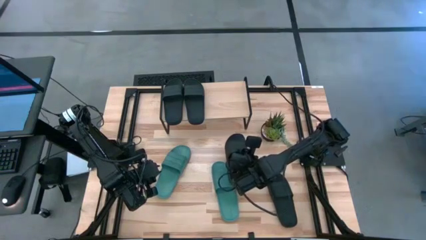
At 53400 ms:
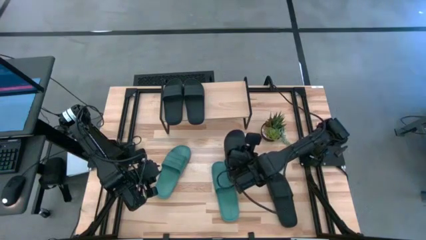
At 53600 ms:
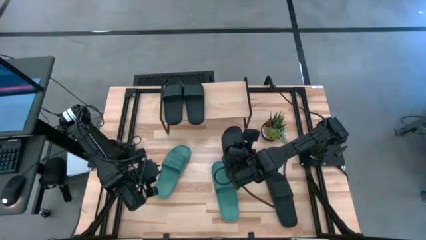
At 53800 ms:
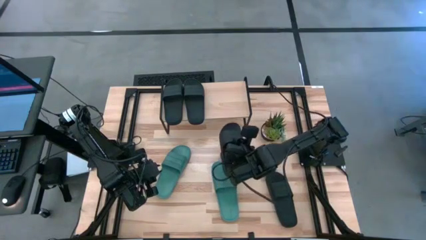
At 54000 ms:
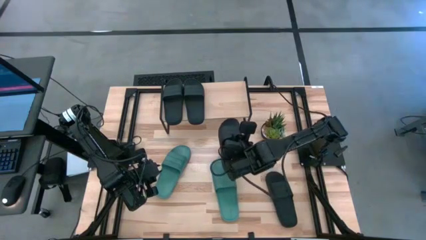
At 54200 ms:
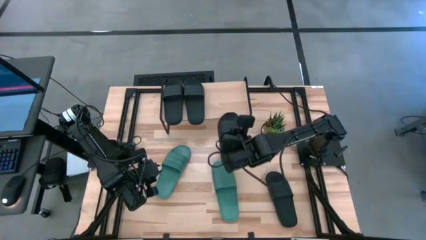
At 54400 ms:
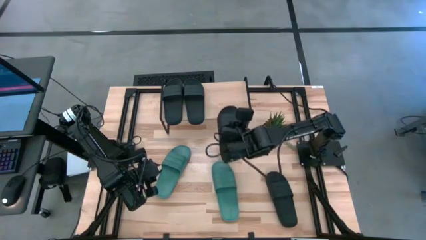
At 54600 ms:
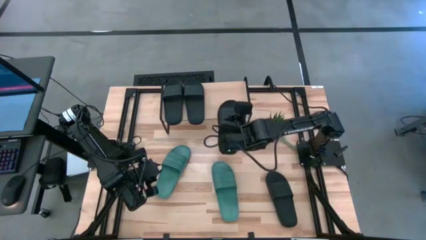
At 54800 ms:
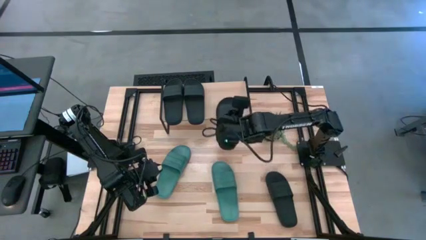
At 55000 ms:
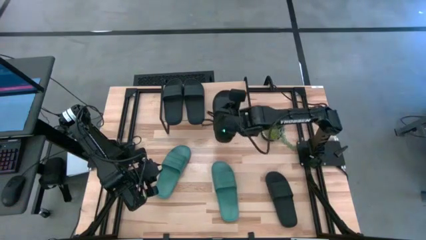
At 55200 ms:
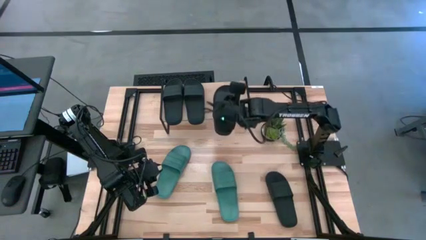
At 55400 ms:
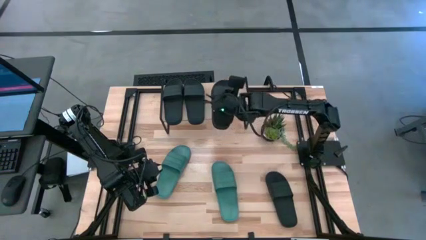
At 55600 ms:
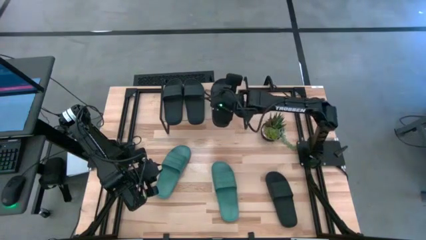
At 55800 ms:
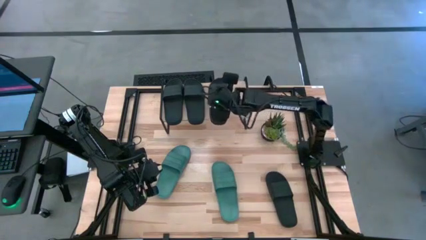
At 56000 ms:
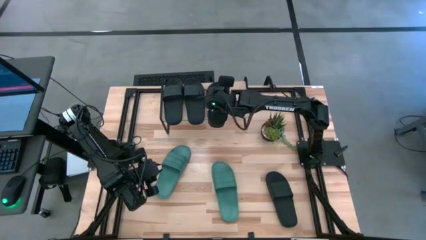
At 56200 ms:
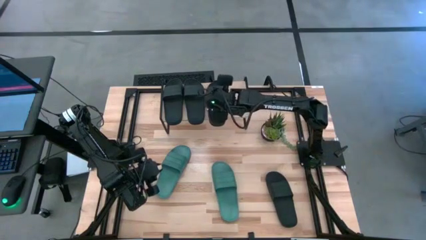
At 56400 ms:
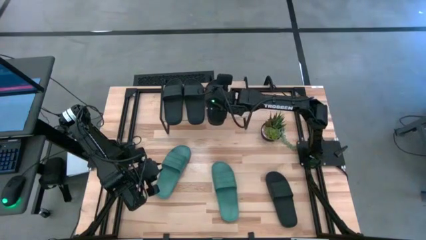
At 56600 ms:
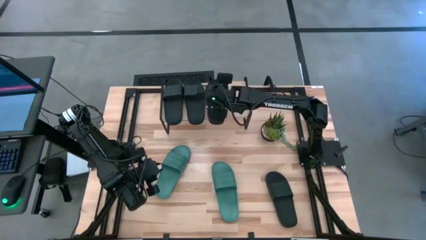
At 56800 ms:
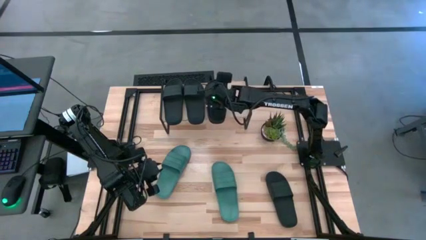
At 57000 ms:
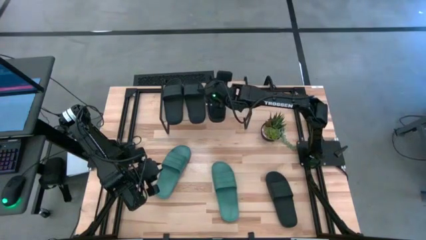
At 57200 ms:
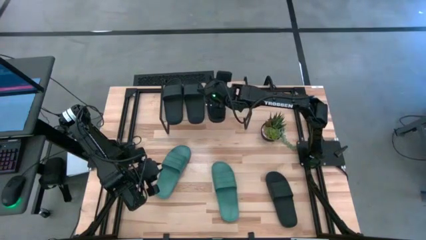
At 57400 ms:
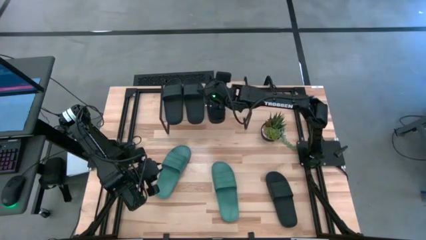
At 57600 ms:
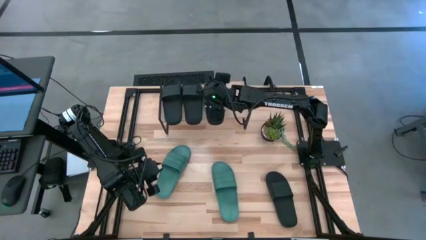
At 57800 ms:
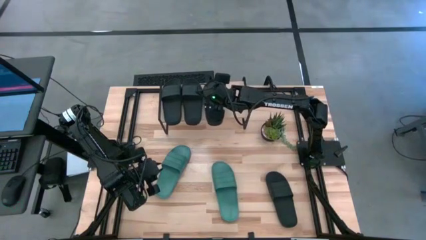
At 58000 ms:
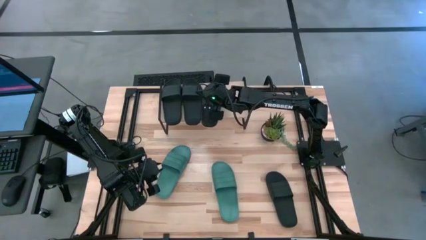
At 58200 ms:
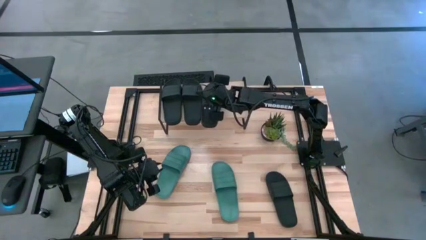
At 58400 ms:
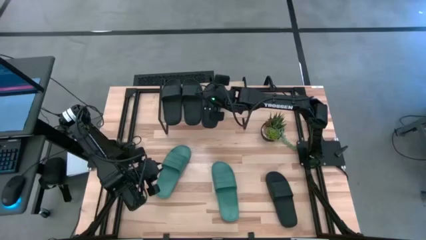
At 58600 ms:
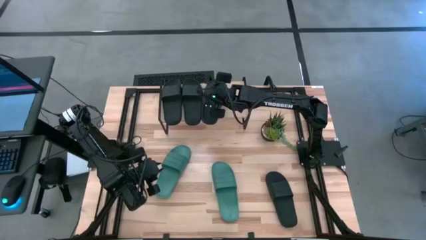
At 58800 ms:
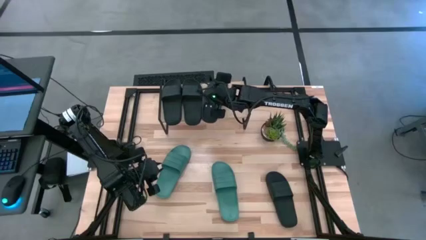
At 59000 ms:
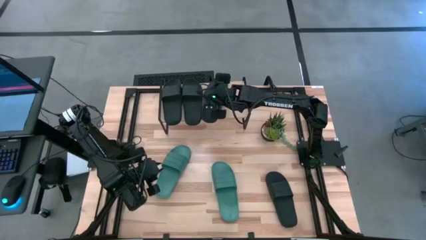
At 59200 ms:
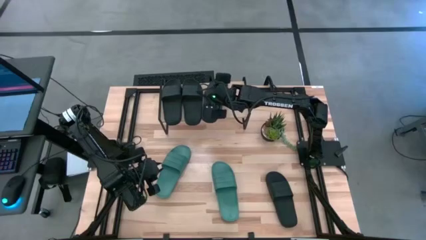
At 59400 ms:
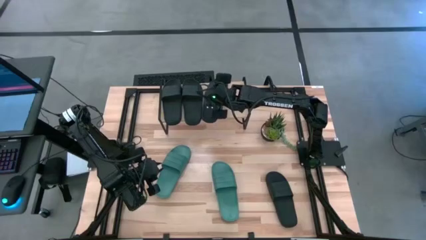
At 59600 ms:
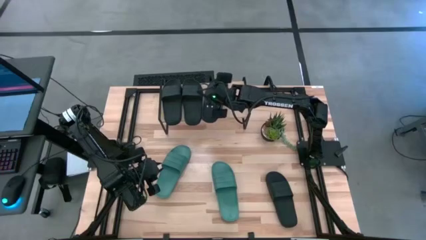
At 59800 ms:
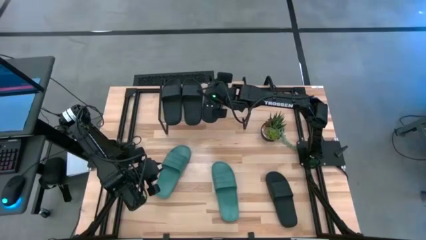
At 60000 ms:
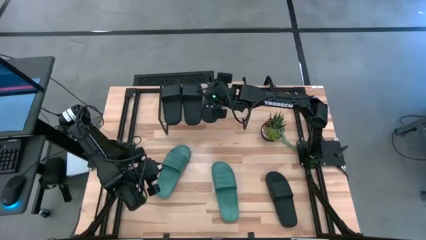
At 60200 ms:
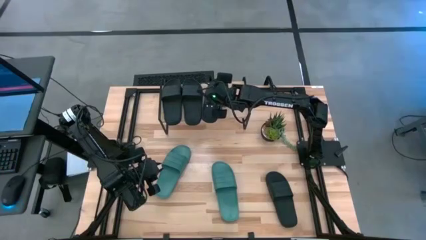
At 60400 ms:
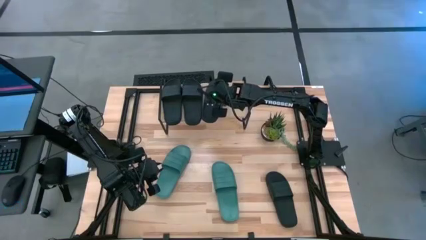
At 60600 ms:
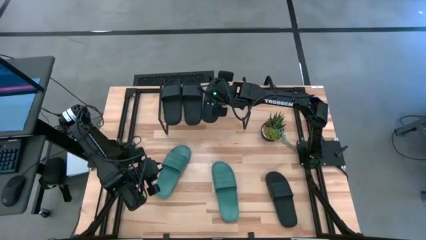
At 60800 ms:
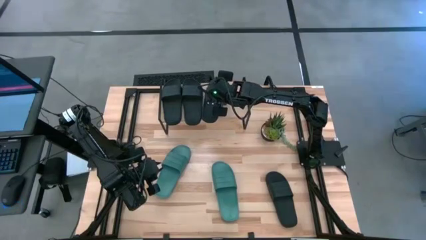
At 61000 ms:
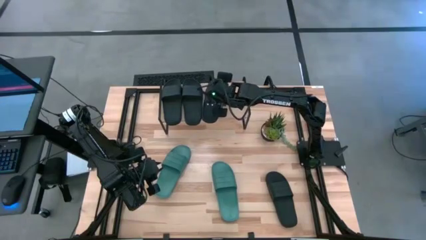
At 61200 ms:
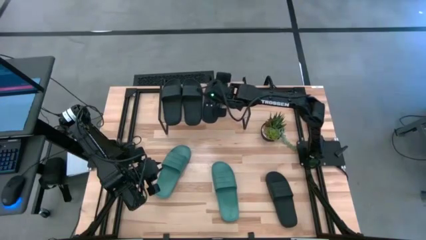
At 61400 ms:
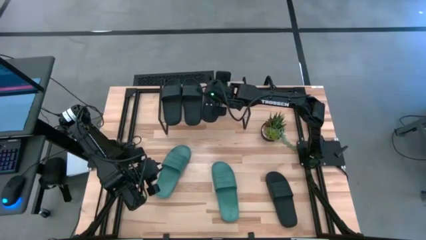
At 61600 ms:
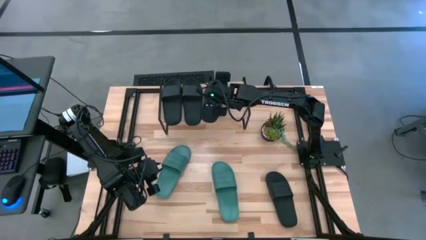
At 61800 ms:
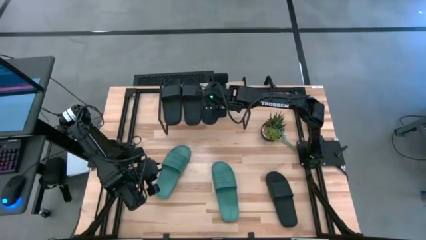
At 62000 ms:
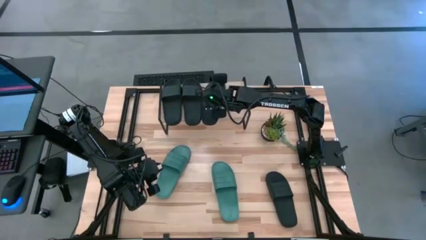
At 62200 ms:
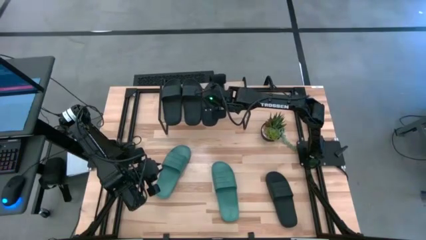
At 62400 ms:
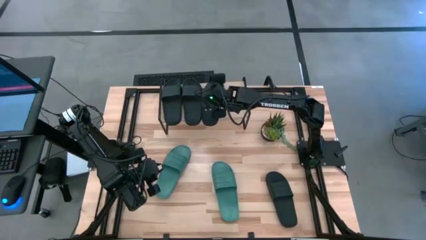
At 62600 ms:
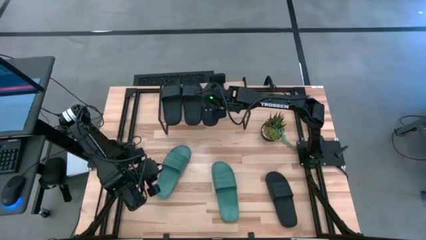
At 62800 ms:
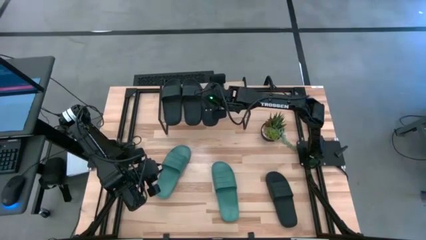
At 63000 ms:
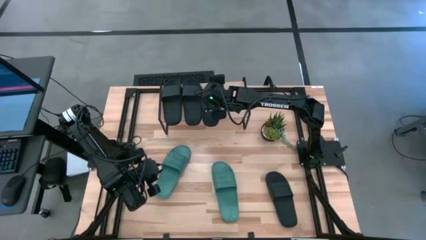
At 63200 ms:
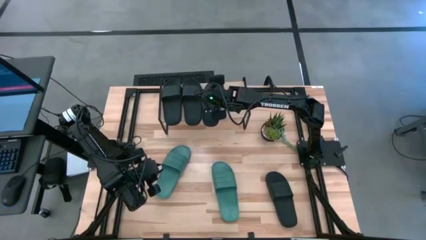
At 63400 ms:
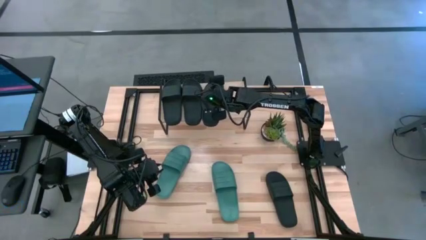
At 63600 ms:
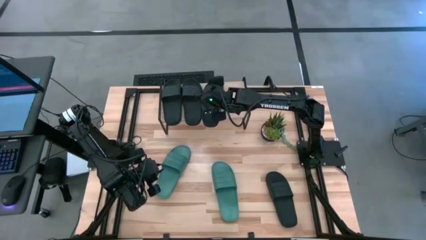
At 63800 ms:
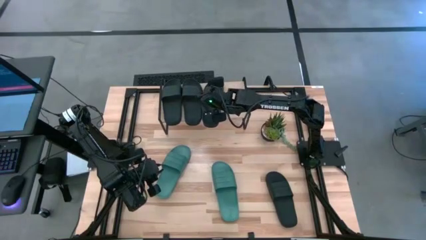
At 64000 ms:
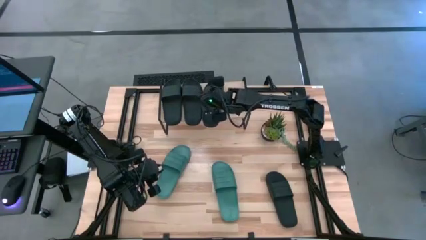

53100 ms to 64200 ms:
Task: Pick and place slides into the shelf
Put the black slide on the shelf

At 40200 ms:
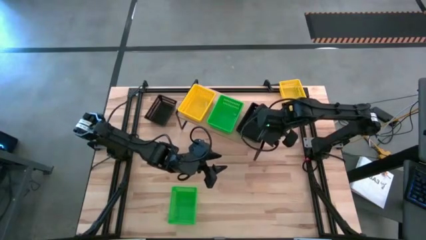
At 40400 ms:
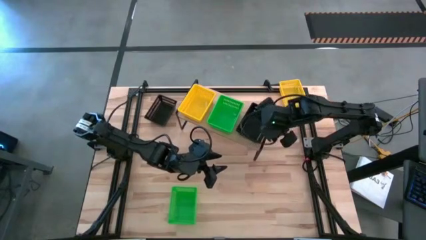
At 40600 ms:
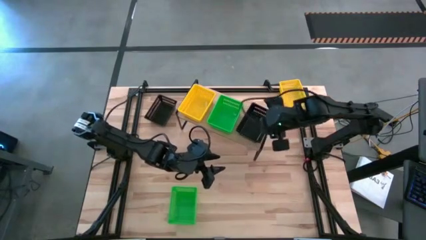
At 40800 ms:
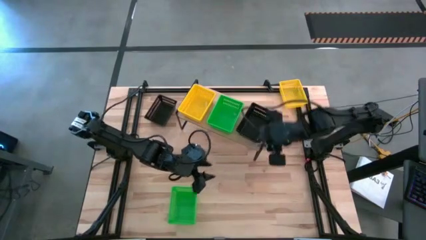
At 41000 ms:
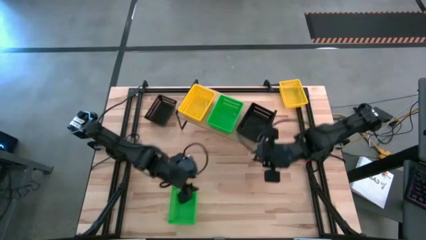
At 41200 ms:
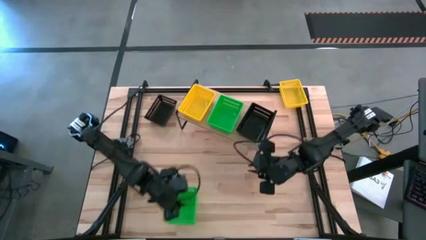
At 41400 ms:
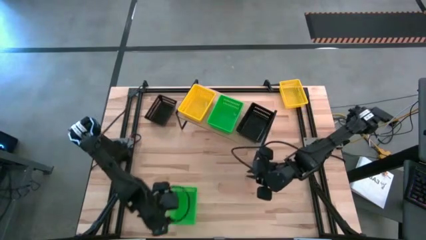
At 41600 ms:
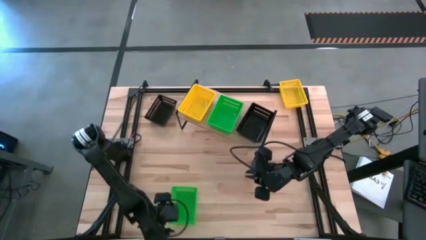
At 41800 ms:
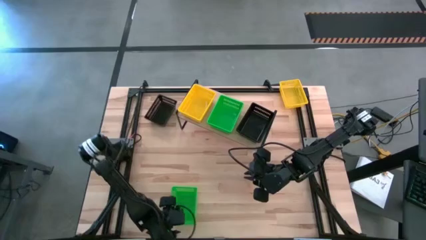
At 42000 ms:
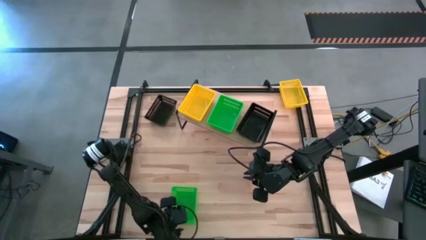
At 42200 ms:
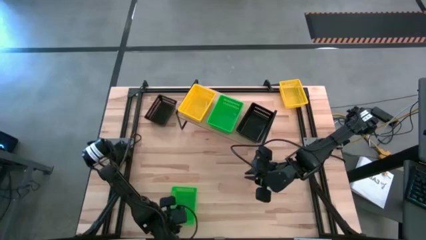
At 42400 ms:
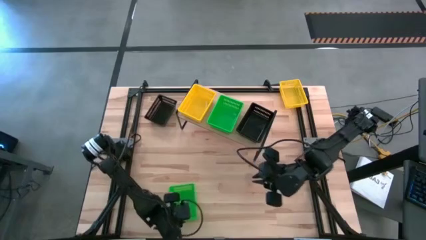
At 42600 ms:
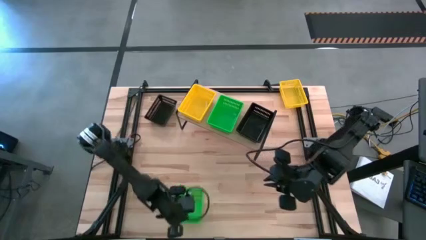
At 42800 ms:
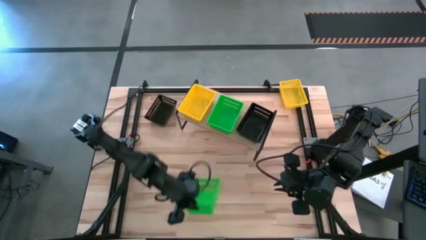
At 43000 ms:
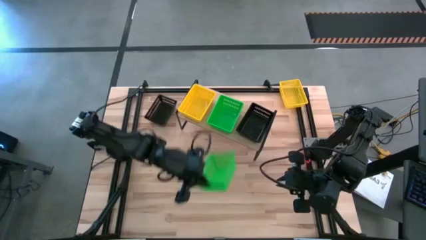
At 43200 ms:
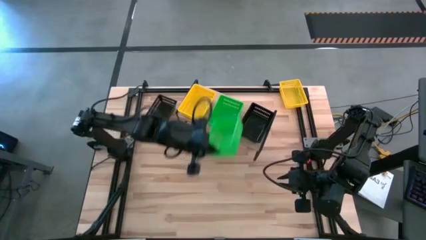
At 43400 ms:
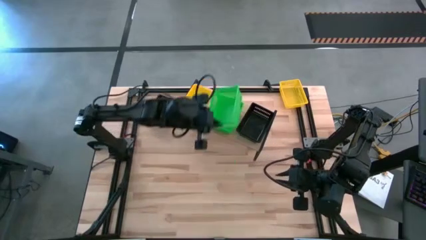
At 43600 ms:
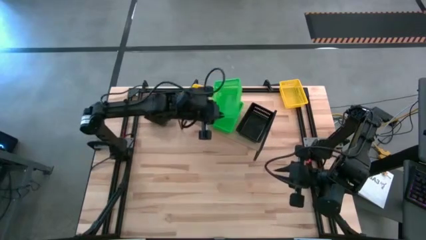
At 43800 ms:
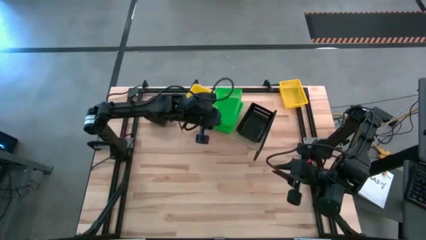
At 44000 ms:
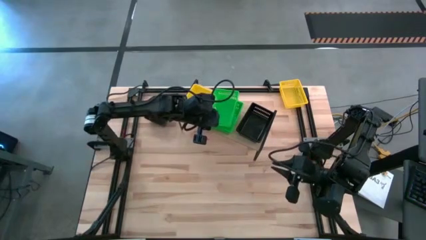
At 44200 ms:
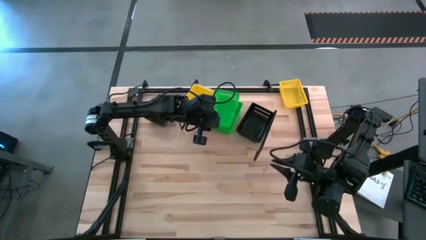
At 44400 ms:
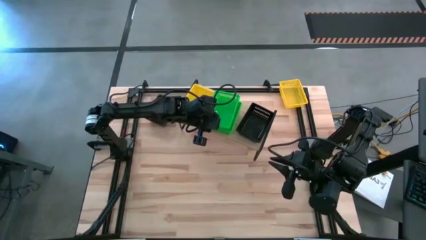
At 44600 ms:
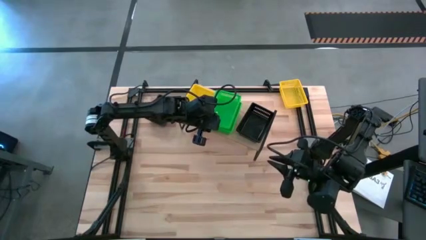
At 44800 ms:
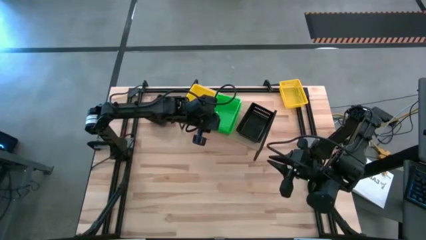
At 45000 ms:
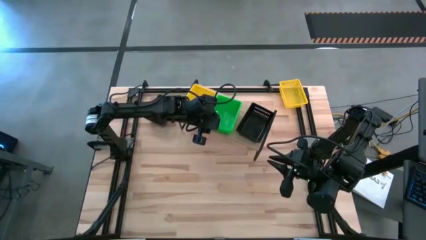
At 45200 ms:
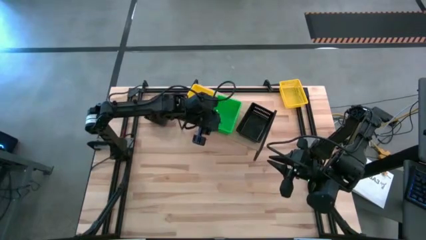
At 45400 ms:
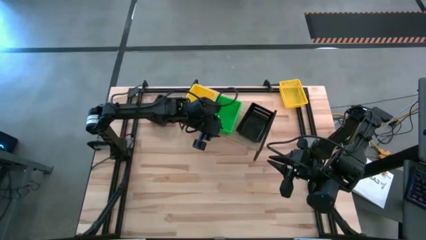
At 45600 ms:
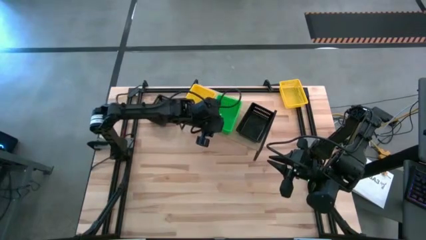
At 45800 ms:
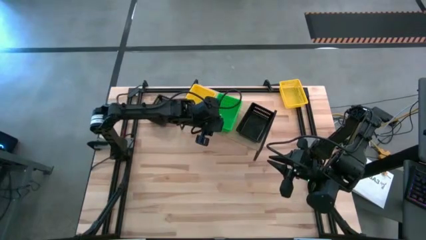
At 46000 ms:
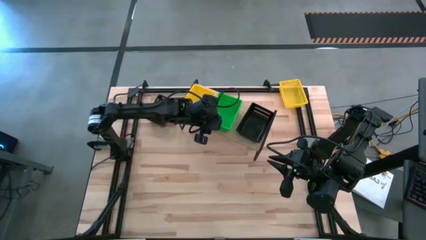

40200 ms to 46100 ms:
Task: Stack baskets on shelf by color
Stack the green bin on top of the green bin
